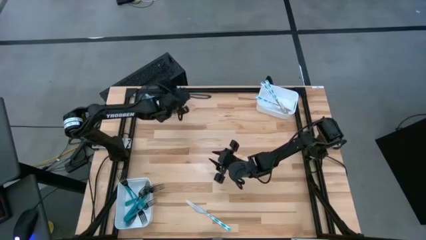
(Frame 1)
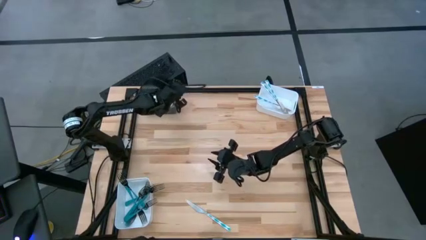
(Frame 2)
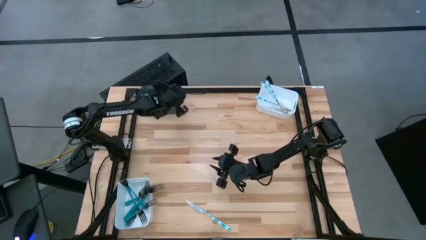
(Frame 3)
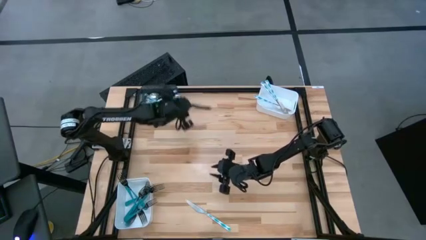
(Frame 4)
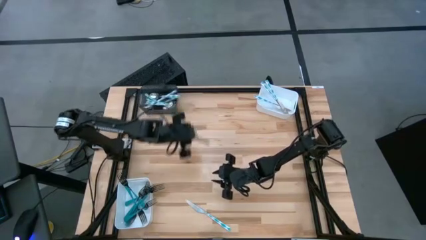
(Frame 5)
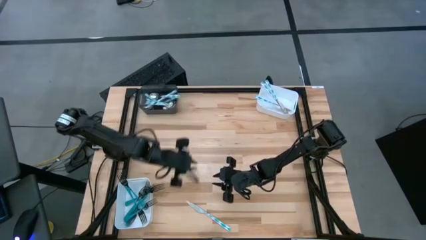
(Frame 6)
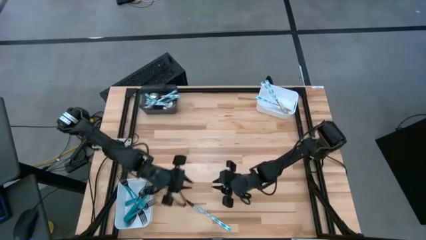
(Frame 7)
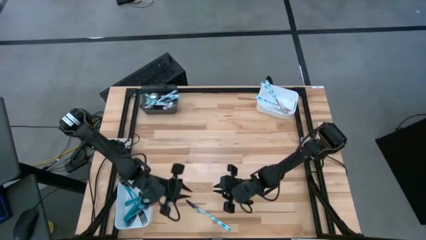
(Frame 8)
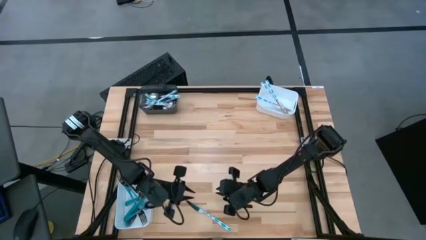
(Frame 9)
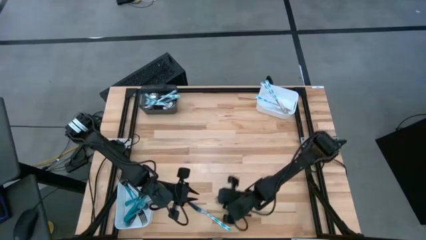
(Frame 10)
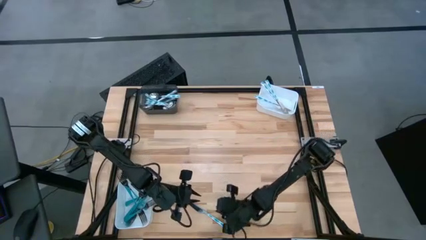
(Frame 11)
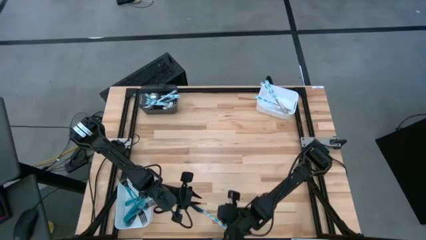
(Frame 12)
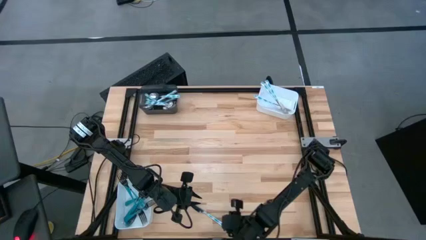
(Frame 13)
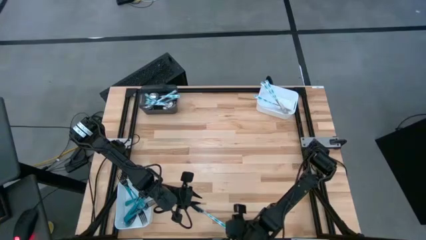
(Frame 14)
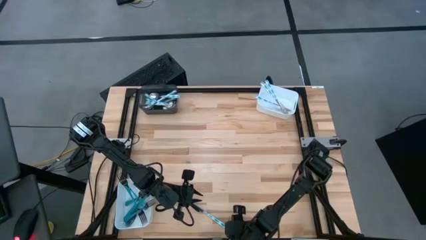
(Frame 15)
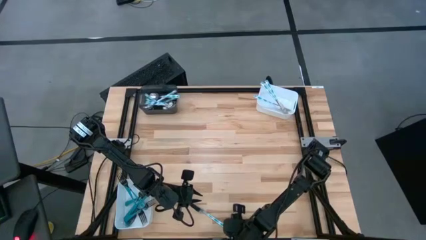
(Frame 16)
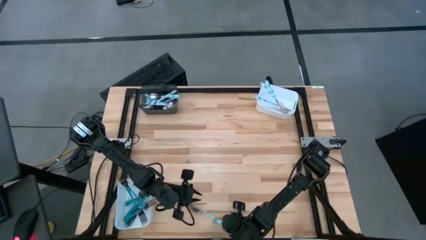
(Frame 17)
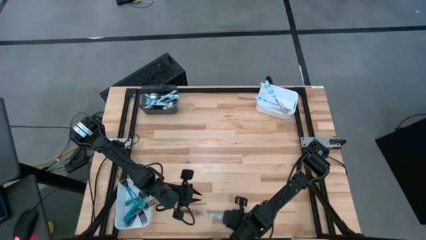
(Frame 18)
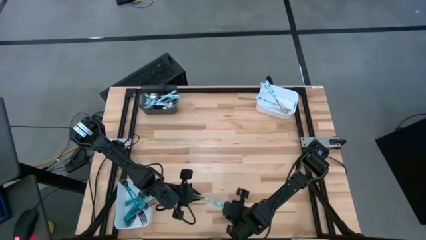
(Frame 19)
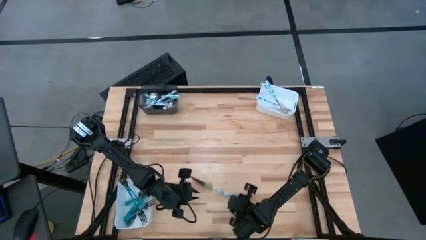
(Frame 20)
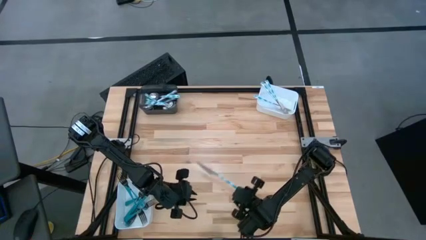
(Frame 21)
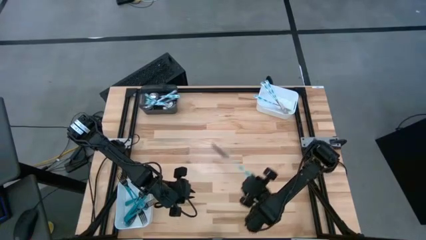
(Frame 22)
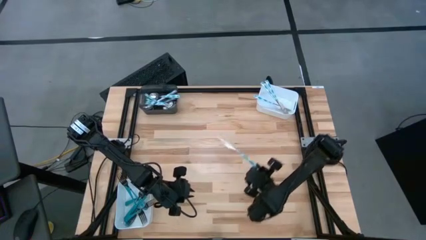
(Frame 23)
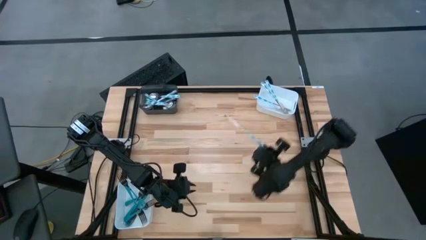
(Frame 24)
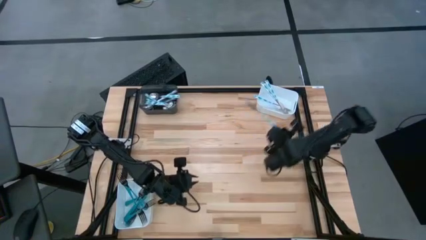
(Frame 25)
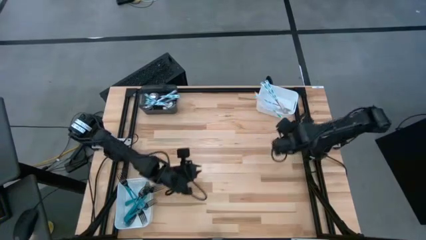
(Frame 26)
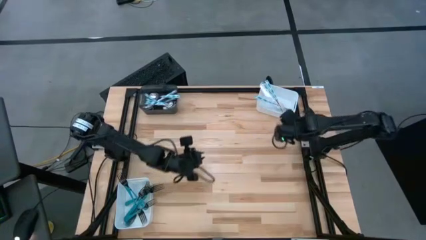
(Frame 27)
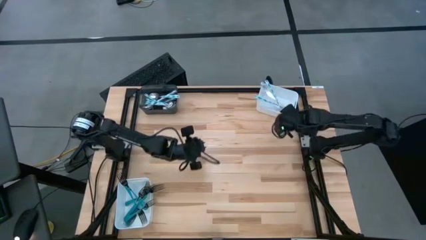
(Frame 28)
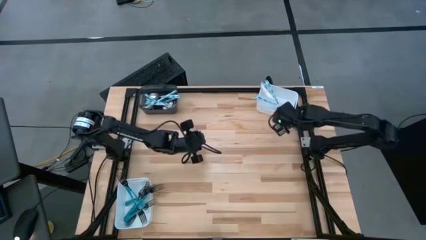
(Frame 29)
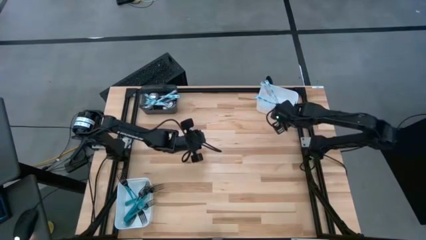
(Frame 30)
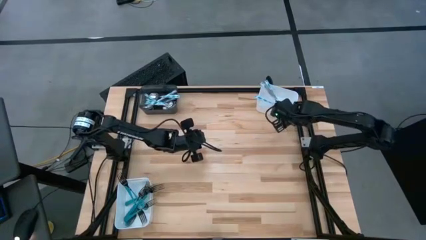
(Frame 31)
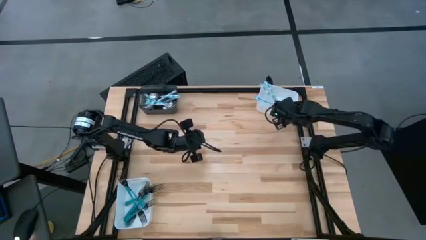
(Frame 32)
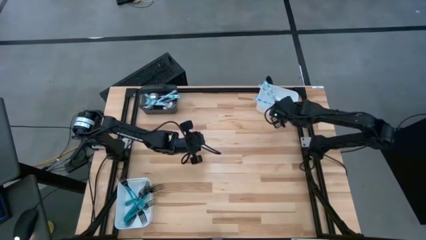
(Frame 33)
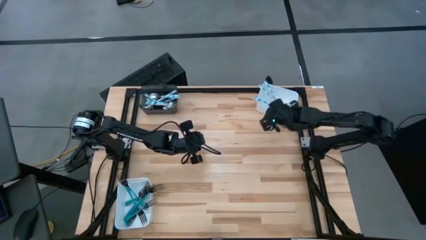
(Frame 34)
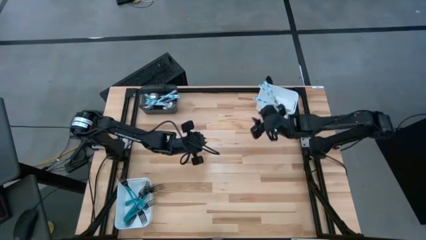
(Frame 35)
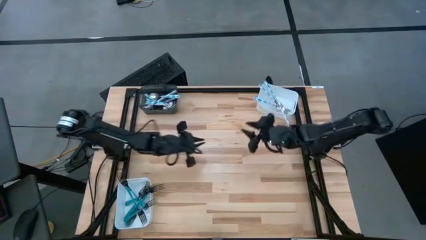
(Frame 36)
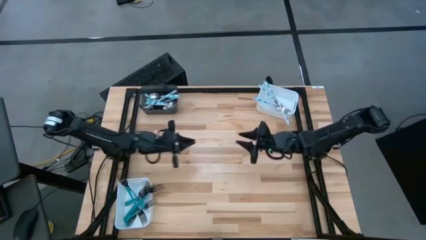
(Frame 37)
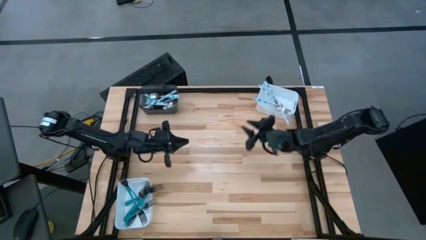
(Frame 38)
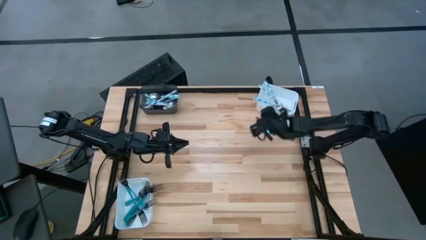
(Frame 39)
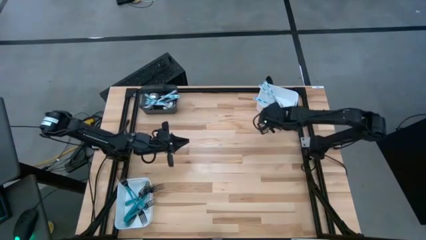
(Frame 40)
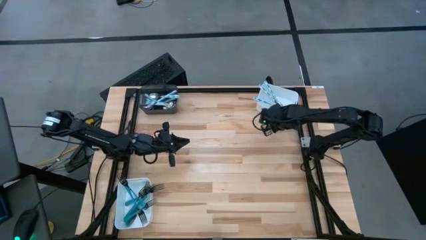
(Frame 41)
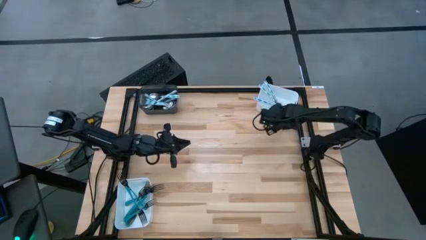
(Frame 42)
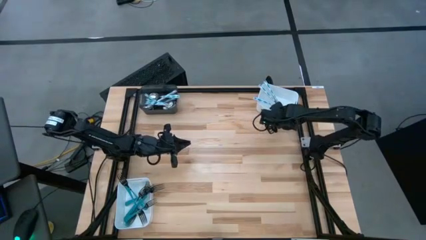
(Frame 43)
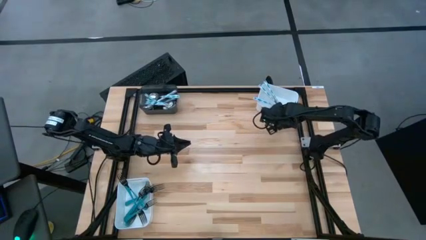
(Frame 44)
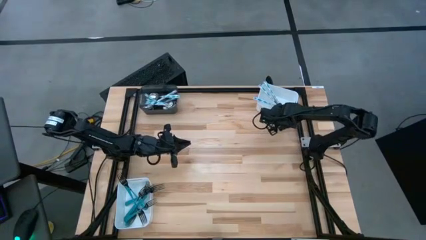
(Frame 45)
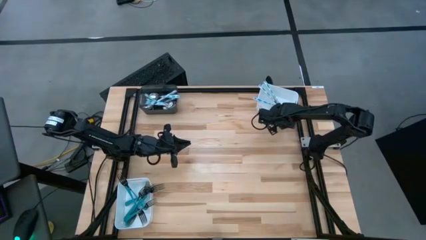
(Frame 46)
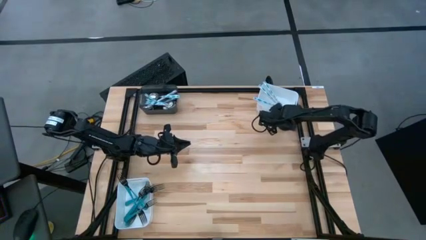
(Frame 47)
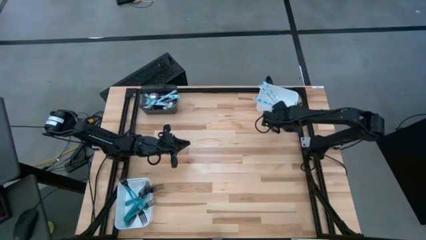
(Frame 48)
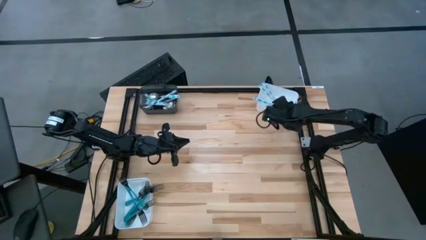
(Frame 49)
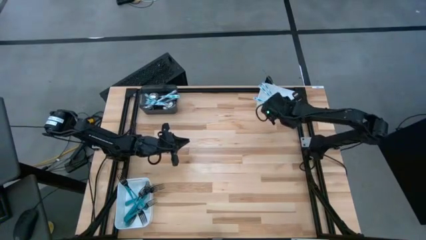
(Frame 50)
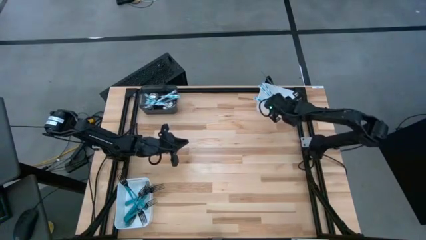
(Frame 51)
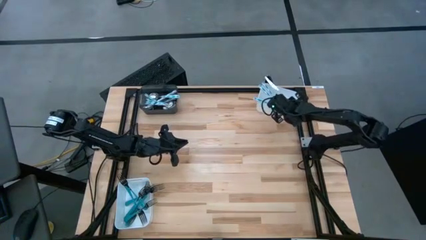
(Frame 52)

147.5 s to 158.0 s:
Task: Sort silverware by color (type)
Put the blue patterned table knife into the top white bin

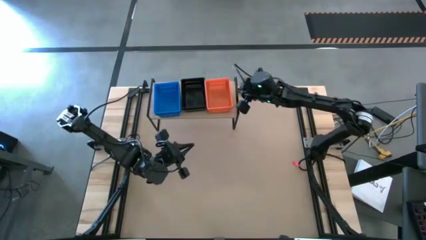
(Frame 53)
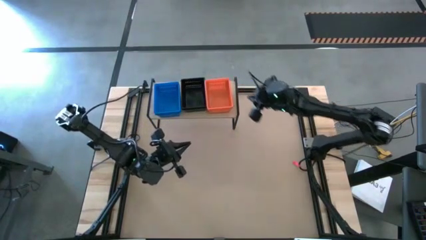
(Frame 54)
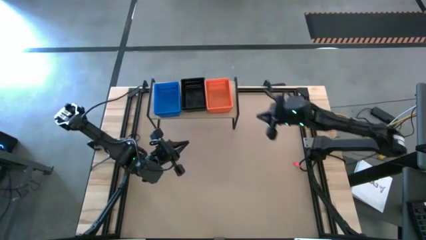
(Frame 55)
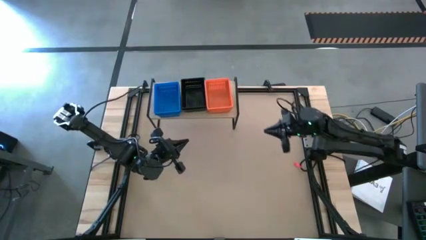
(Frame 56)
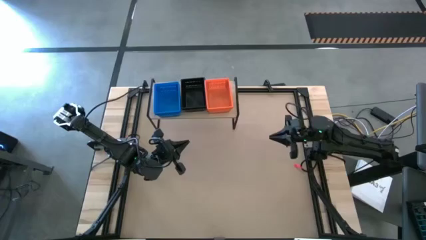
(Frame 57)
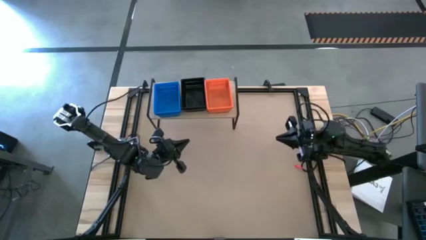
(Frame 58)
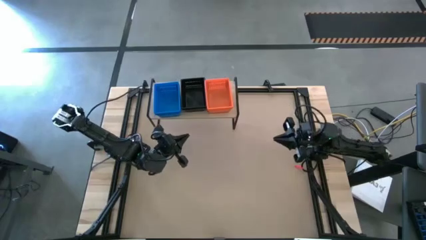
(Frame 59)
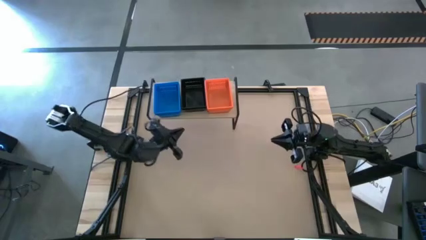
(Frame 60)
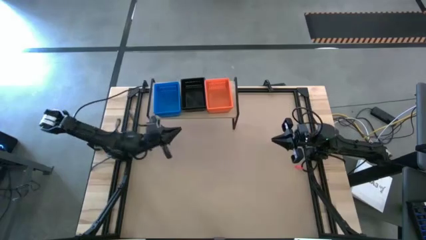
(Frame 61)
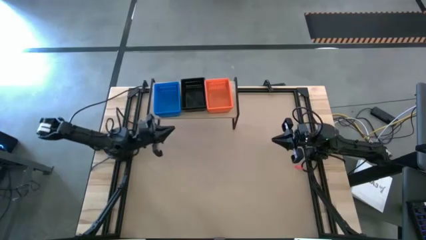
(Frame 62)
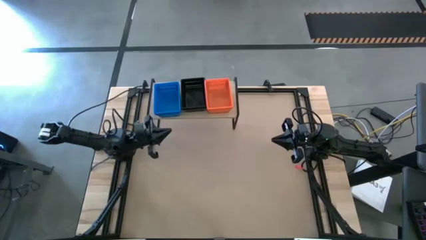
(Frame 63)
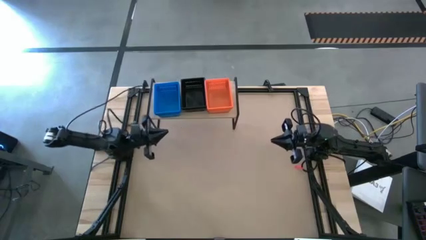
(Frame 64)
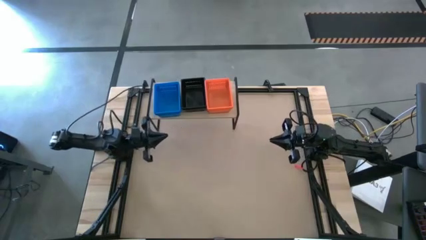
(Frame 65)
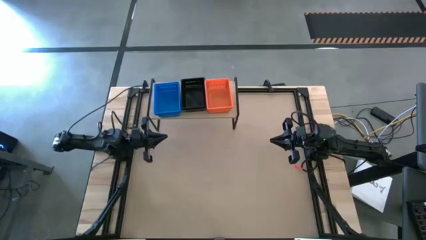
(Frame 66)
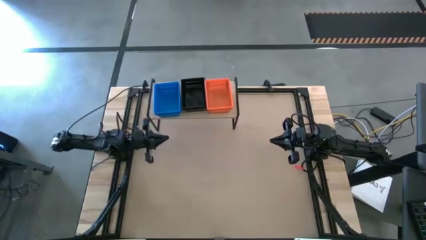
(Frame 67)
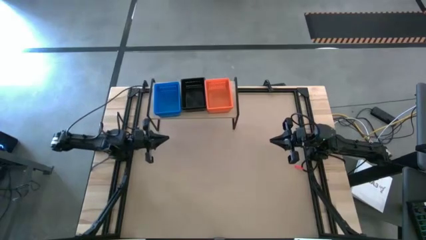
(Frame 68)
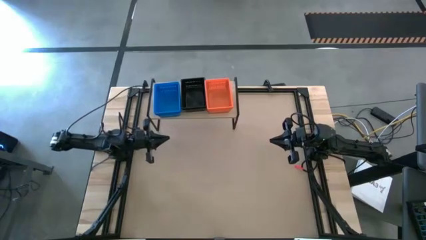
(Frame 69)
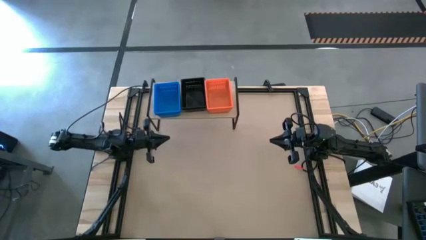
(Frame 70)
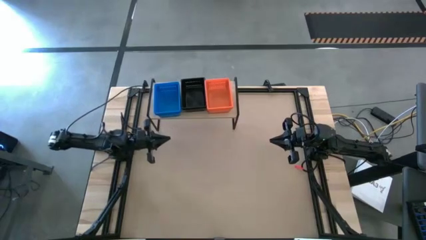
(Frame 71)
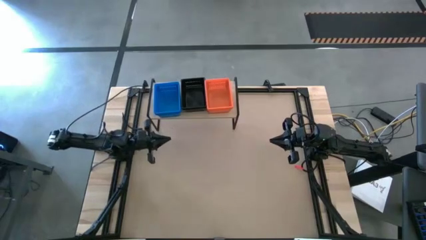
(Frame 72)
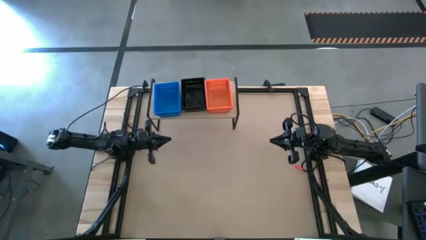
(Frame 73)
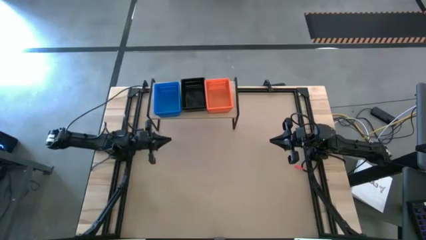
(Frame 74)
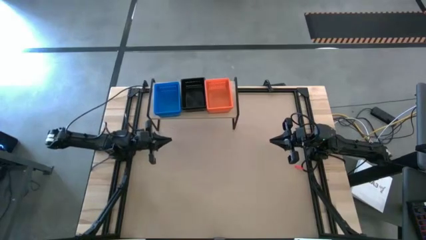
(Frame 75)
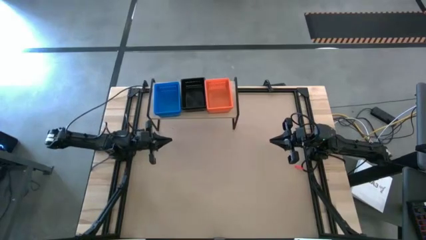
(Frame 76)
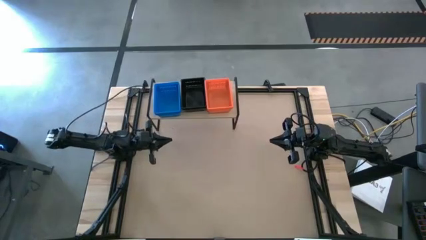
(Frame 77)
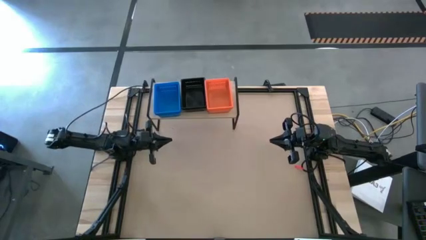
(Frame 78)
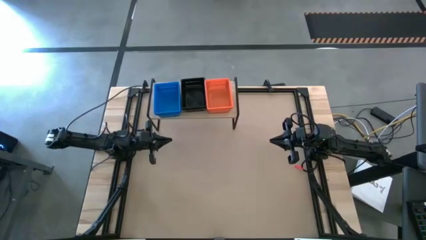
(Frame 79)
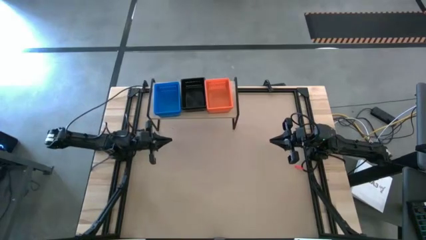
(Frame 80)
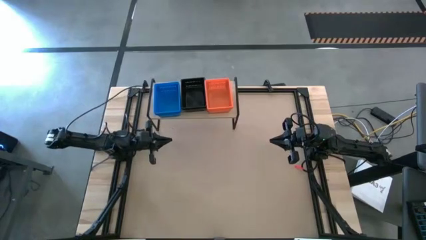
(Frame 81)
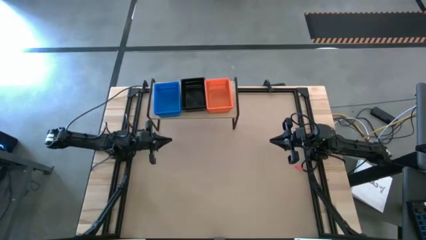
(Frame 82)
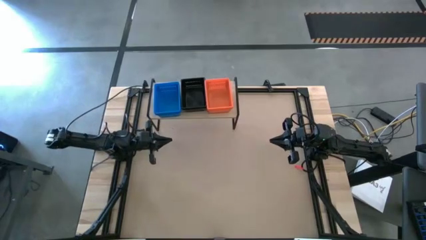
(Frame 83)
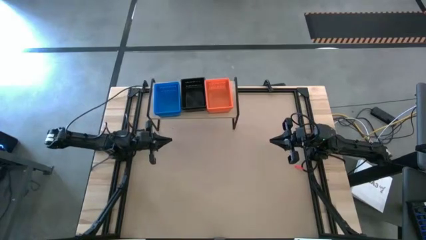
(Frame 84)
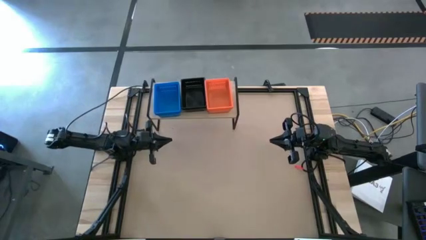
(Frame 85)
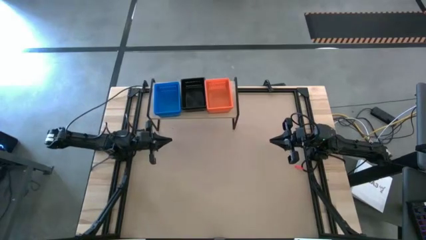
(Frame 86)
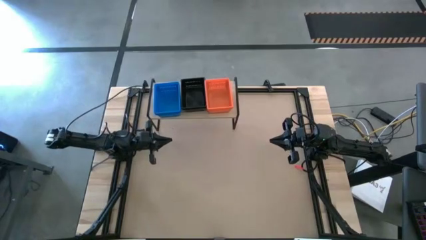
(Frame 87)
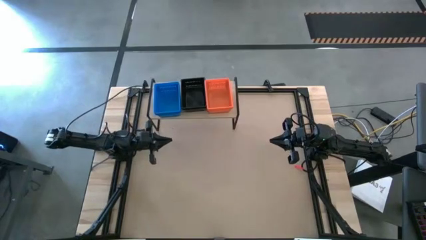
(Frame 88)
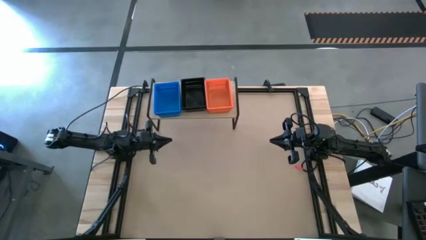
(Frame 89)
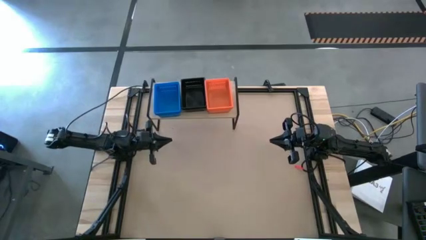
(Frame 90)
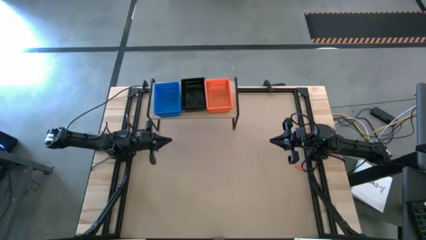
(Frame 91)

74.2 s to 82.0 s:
Task: Stack baskets on shelf by color
Return to Home Position
